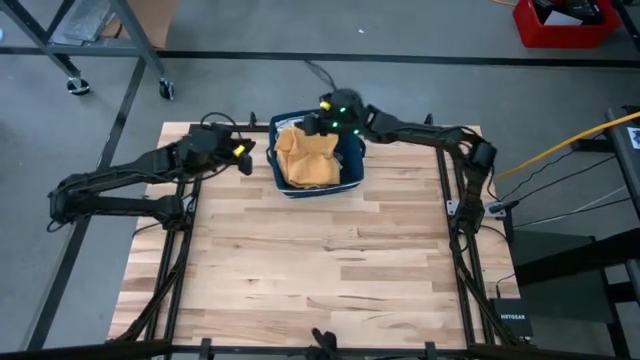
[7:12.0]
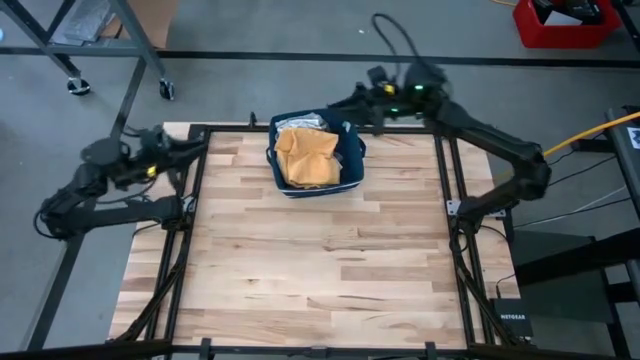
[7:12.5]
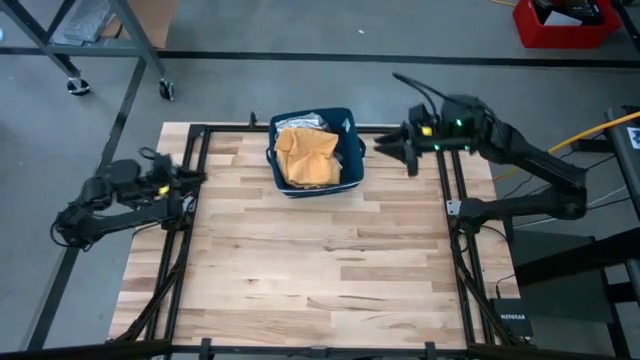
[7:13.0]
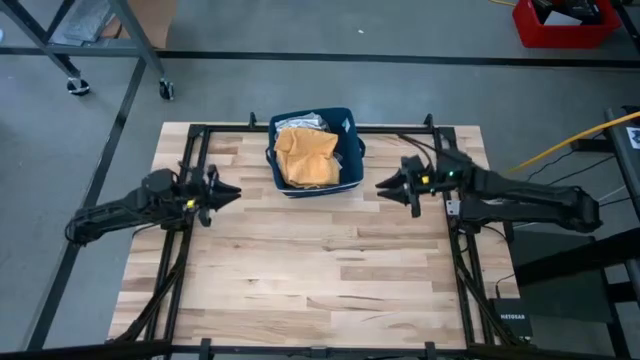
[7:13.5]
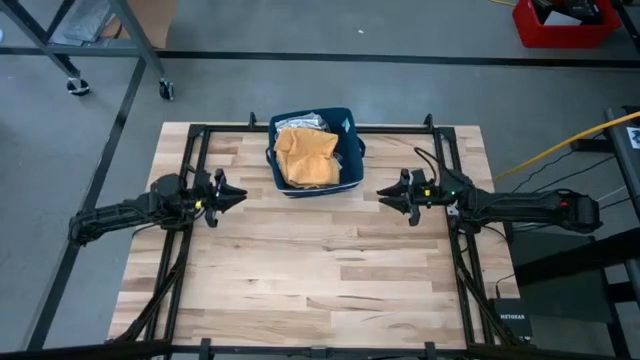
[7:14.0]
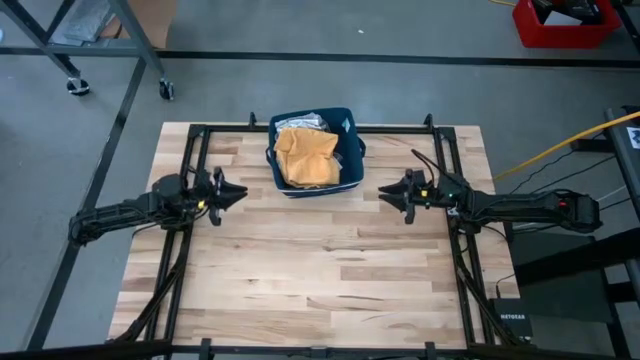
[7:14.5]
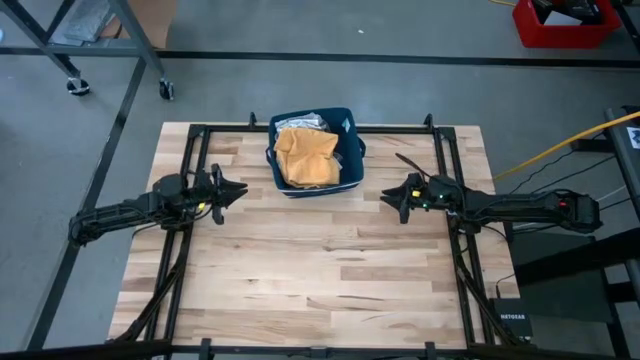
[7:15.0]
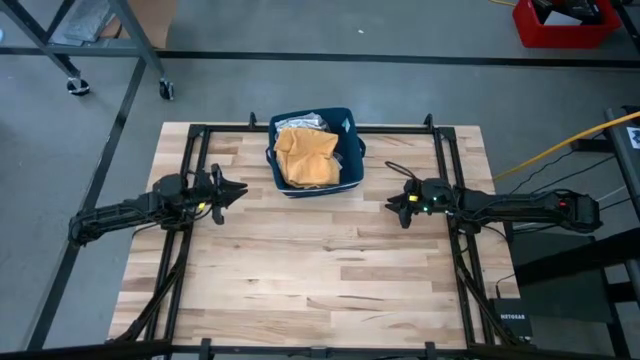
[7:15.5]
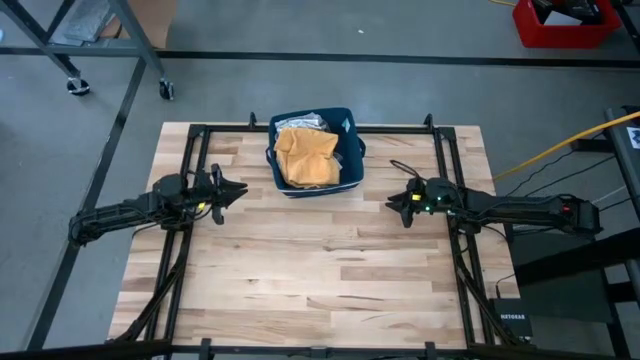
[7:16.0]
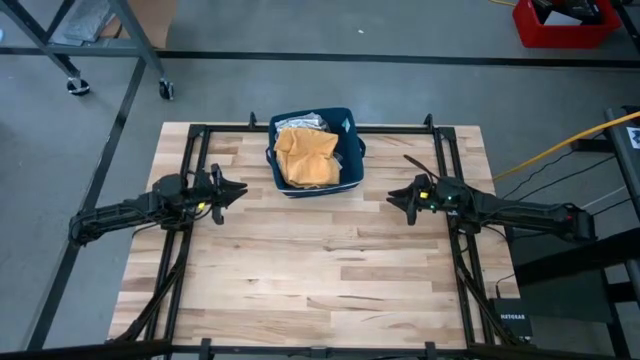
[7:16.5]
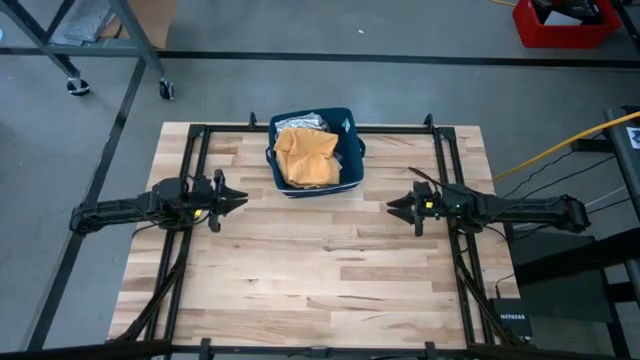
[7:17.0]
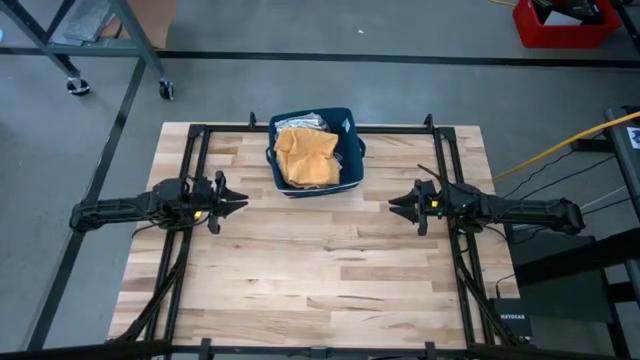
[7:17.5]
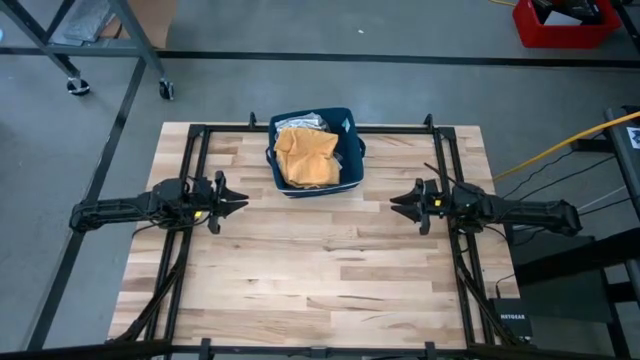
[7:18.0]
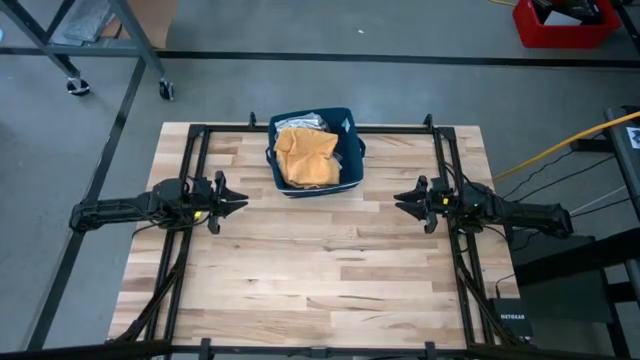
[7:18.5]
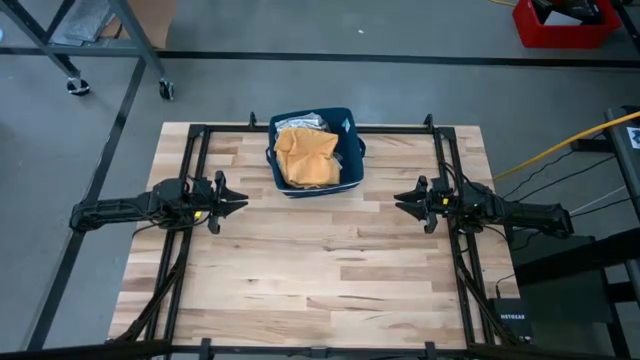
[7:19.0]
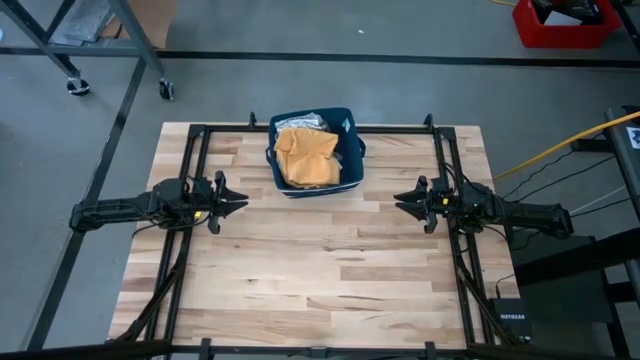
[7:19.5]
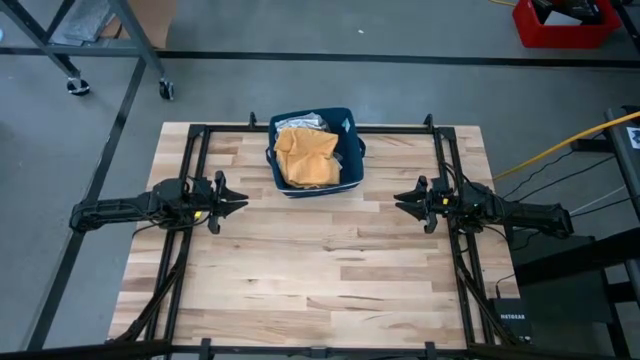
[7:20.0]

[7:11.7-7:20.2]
Task: Fold towel
Return to Home Position

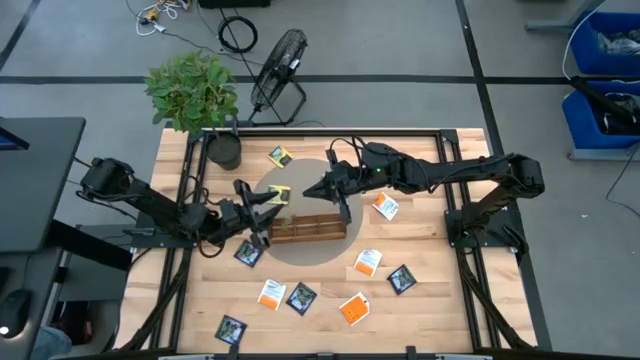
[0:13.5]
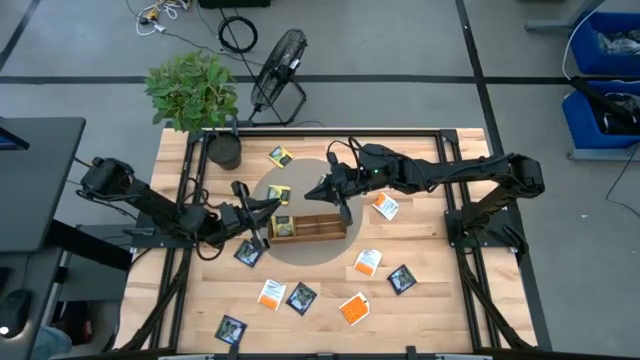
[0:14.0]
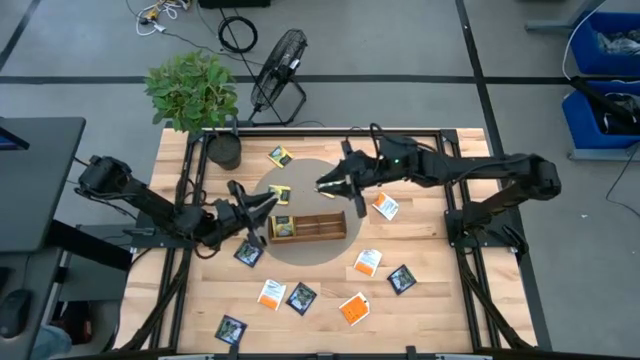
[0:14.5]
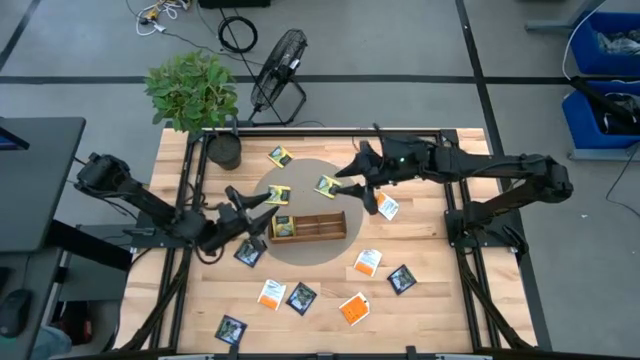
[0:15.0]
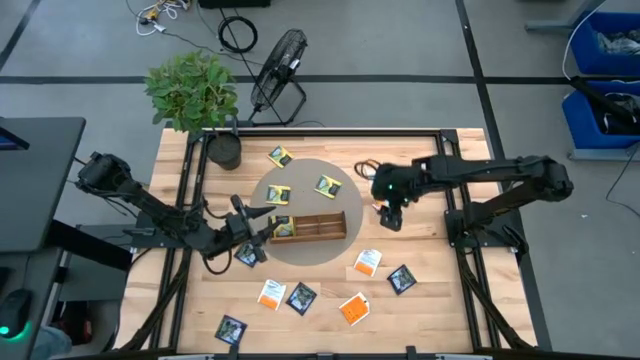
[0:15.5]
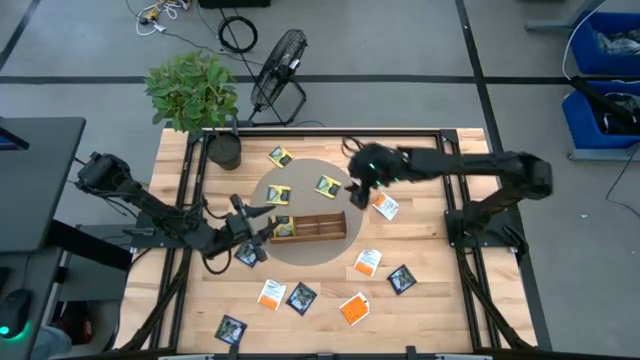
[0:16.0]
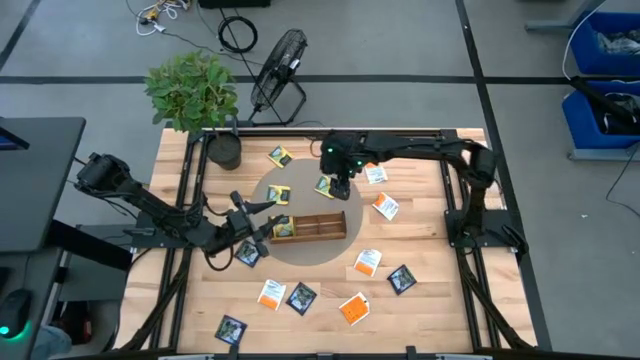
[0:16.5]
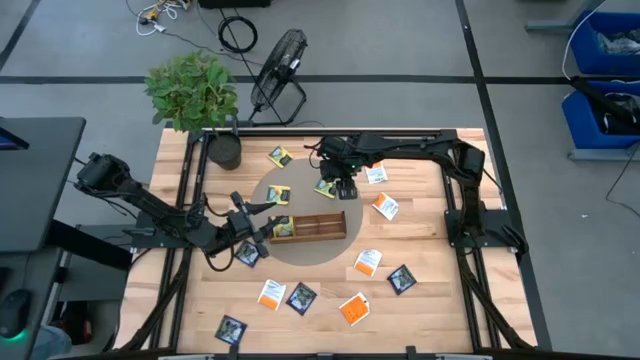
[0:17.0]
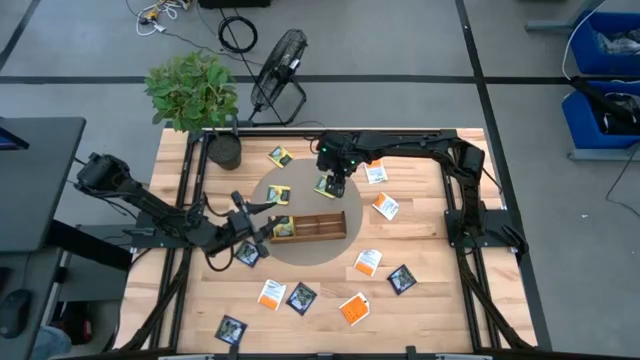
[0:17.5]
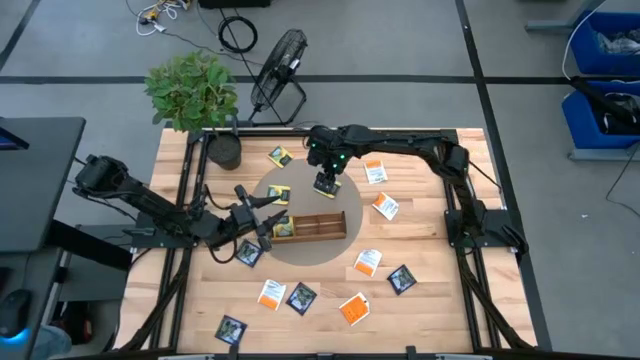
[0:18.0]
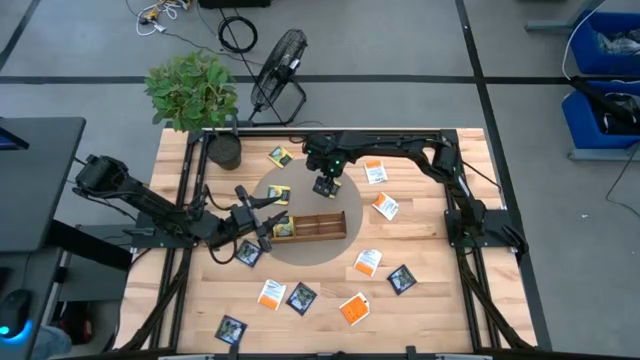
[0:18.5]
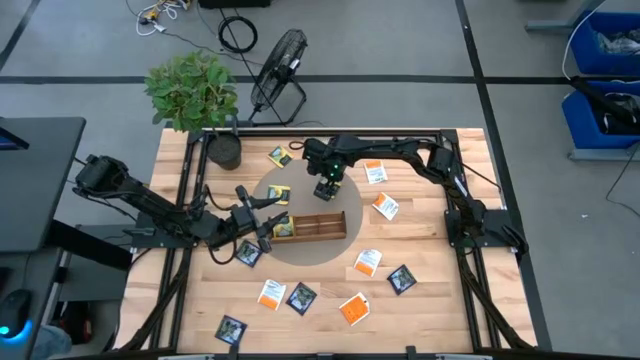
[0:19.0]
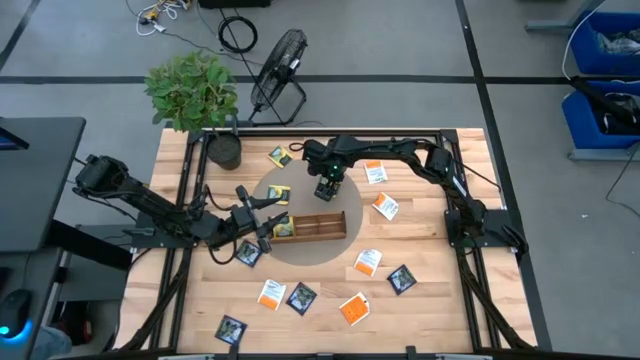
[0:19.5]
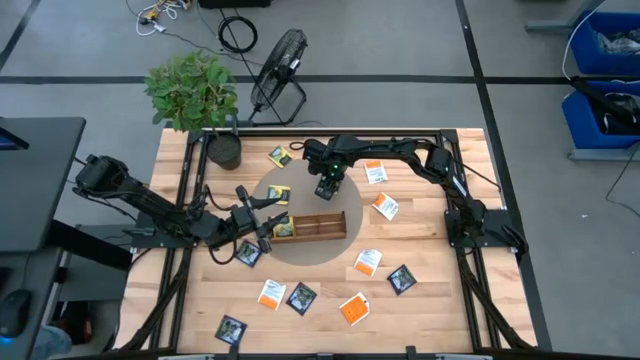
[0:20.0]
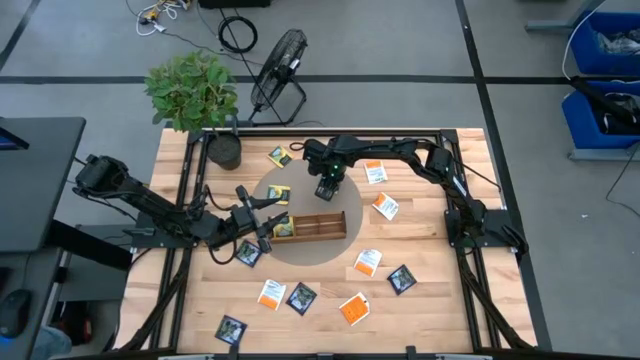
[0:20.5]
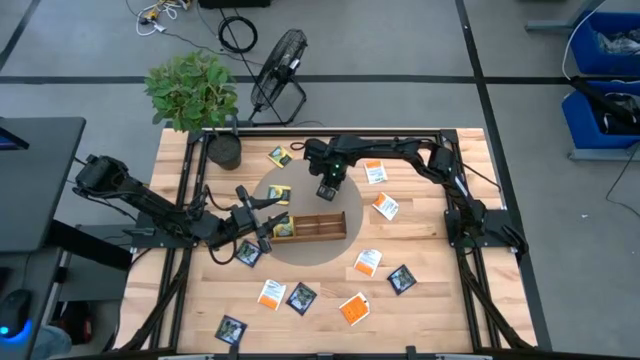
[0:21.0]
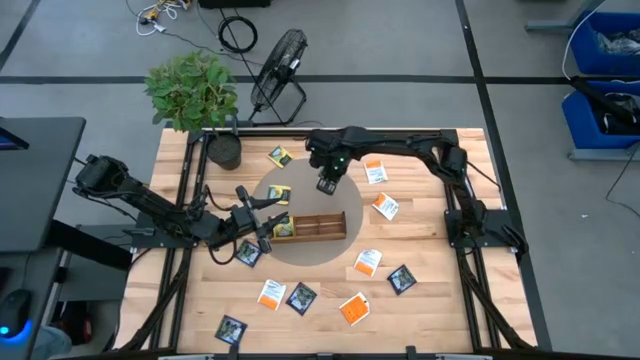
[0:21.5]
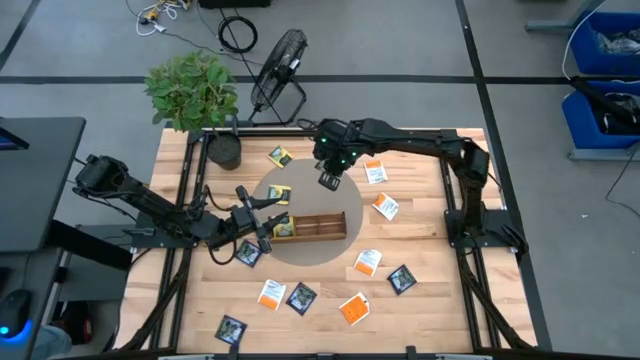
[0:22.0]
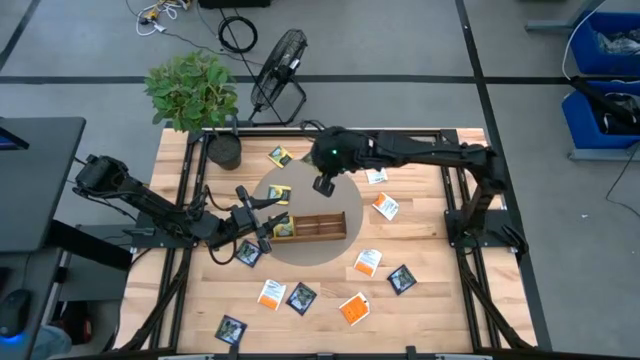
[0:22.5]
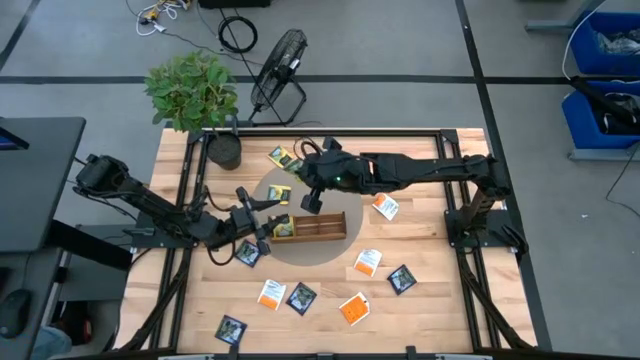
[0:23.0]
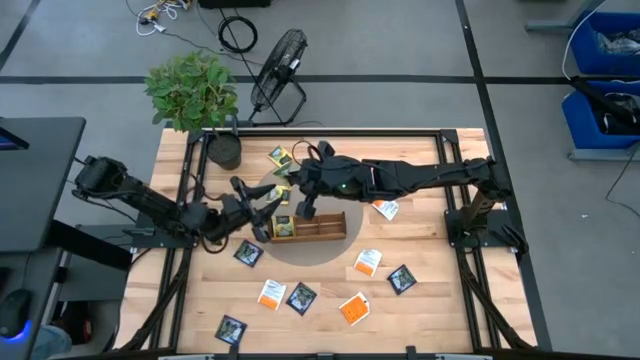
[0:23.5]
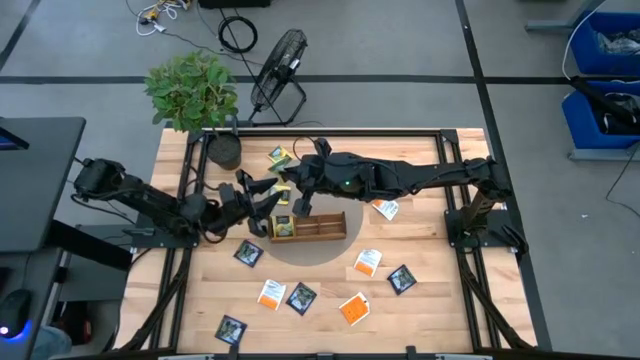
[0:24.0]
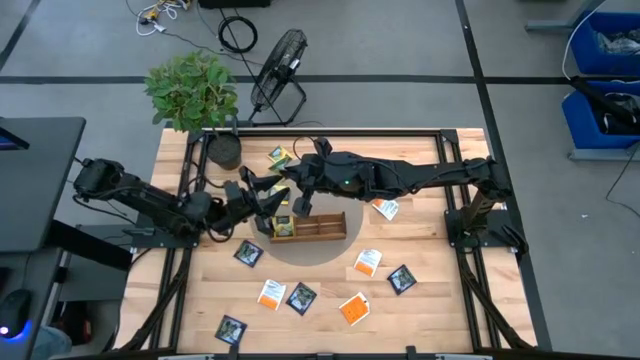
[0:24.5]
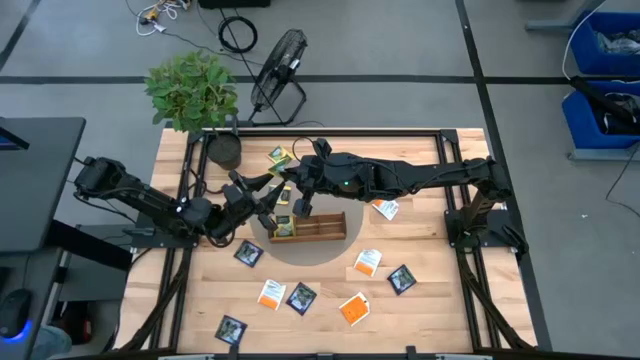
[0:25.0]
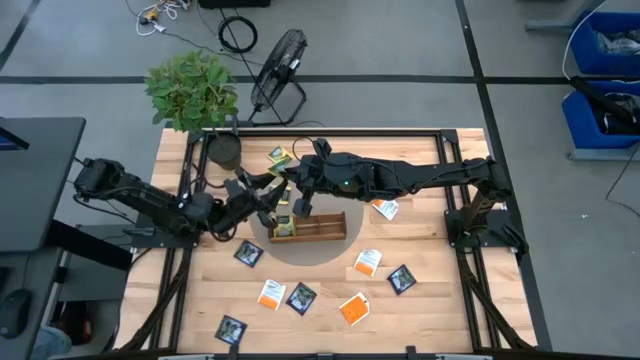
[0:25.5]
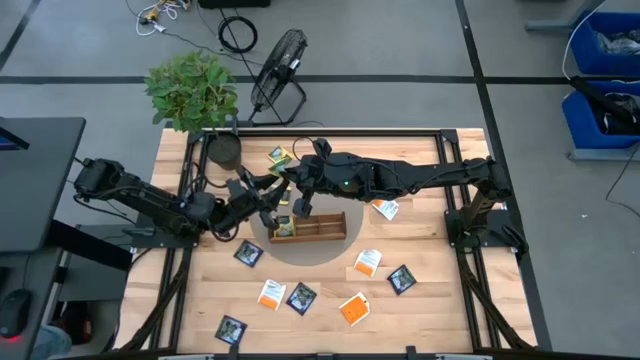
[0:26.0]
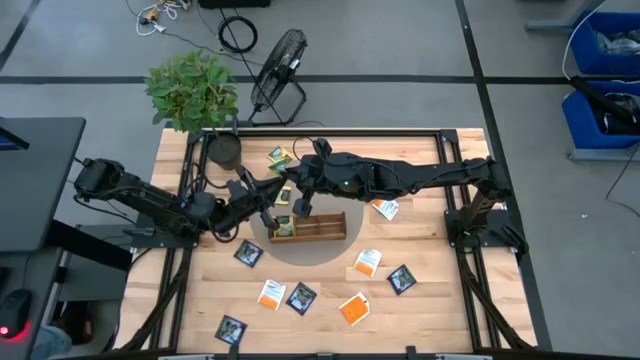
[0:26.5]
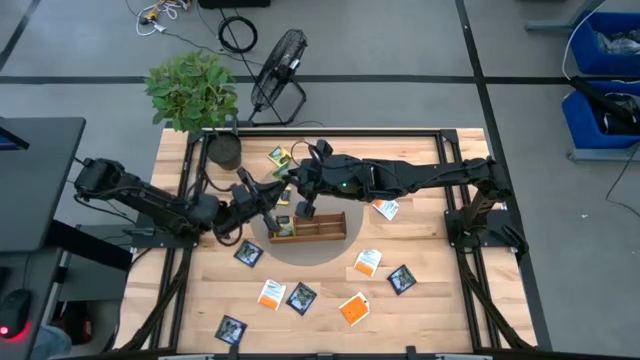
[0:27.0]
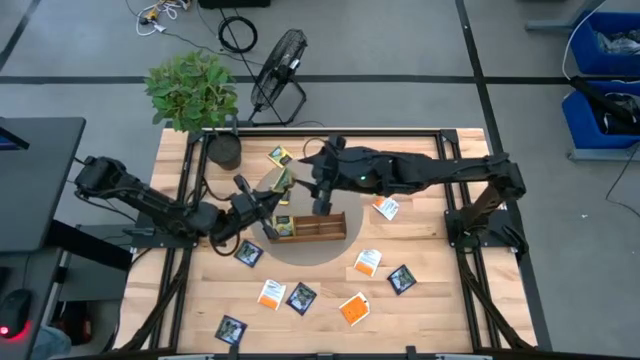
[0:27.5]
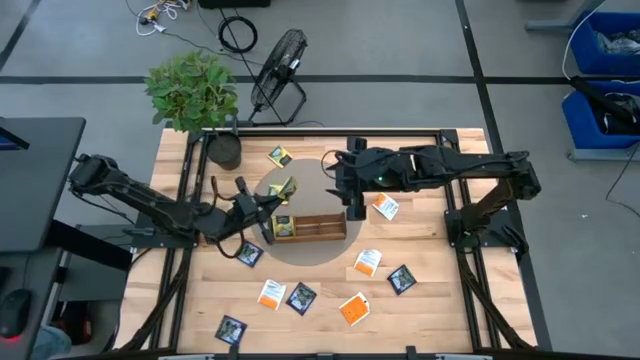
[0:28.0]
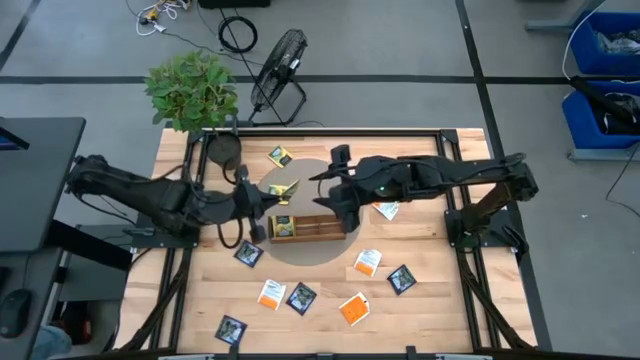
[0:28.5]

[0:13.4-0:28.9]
Task: Pick & Place Tea
Put the right yellow tea bag into the left section of the wooden organizer
